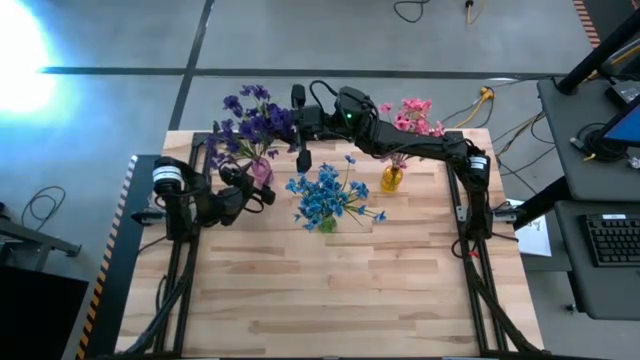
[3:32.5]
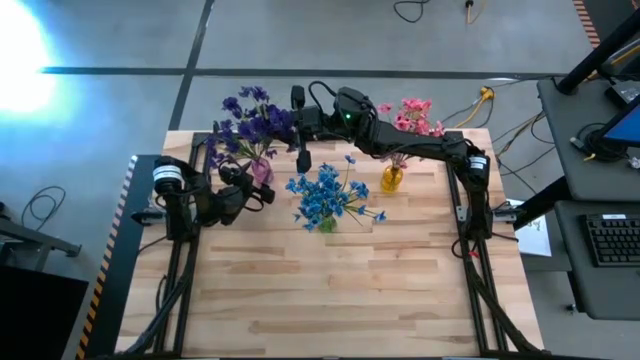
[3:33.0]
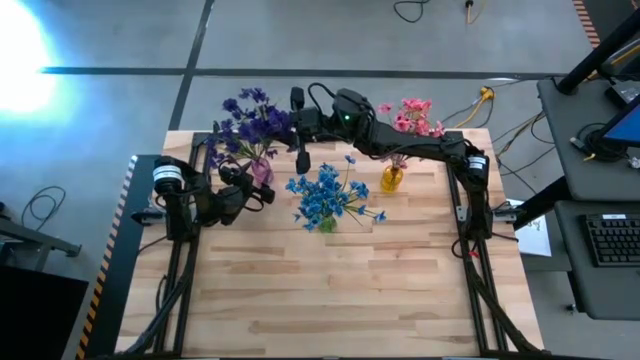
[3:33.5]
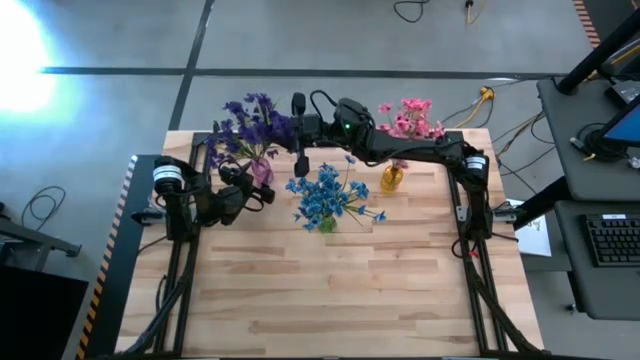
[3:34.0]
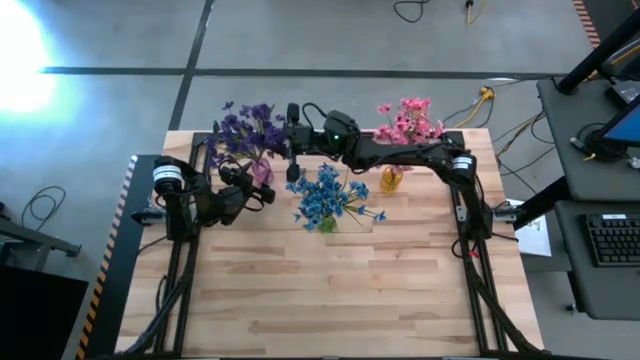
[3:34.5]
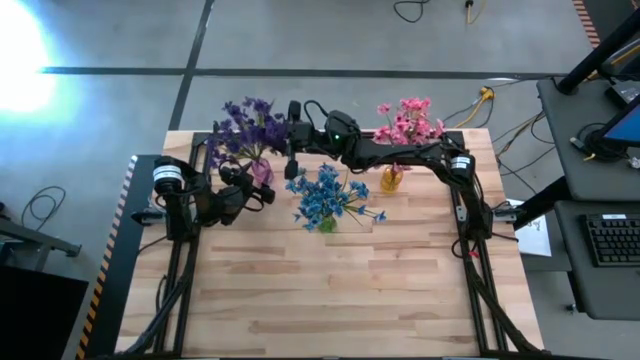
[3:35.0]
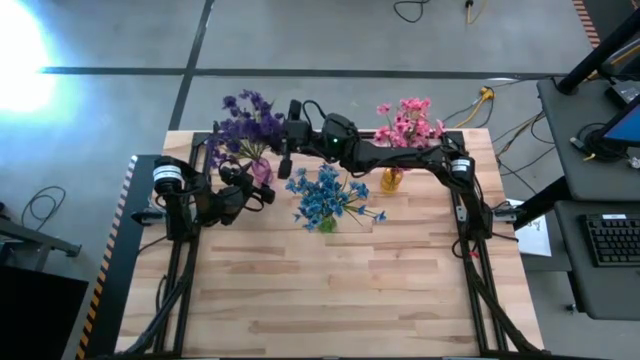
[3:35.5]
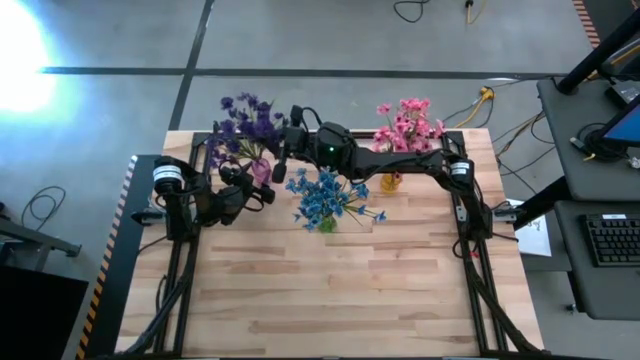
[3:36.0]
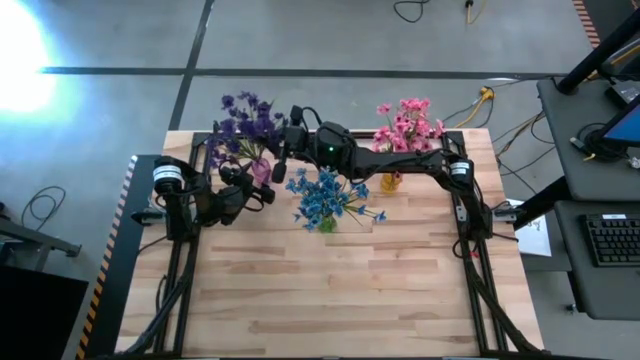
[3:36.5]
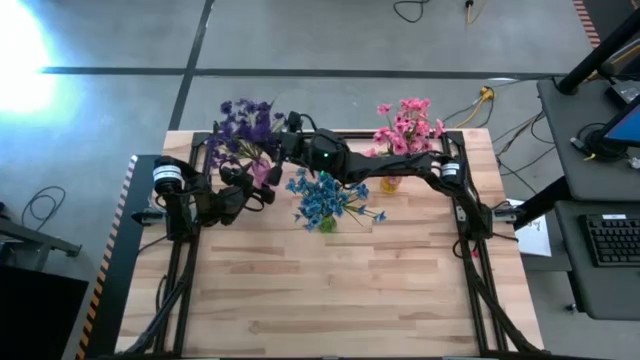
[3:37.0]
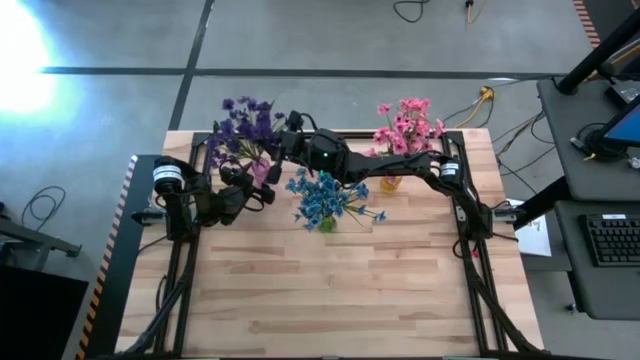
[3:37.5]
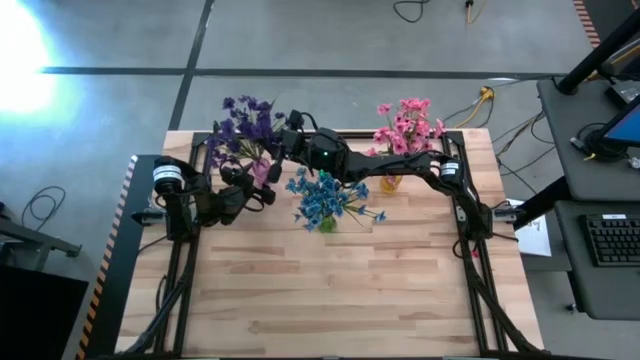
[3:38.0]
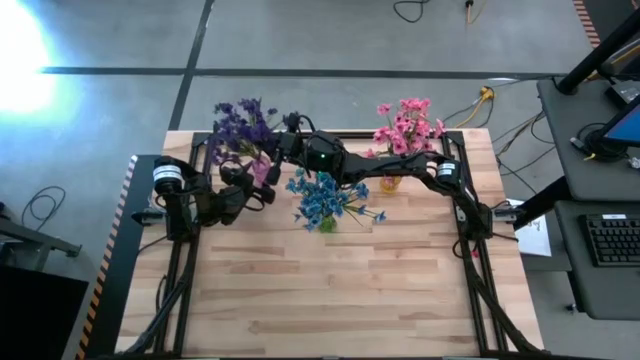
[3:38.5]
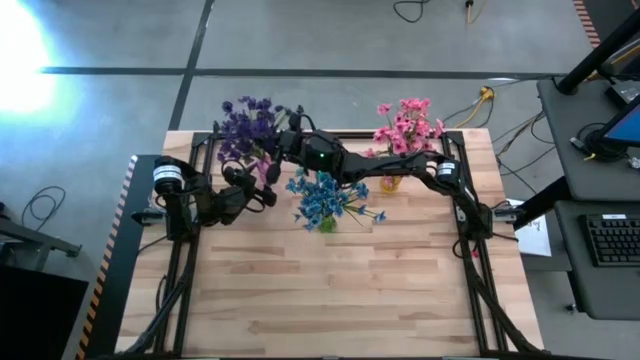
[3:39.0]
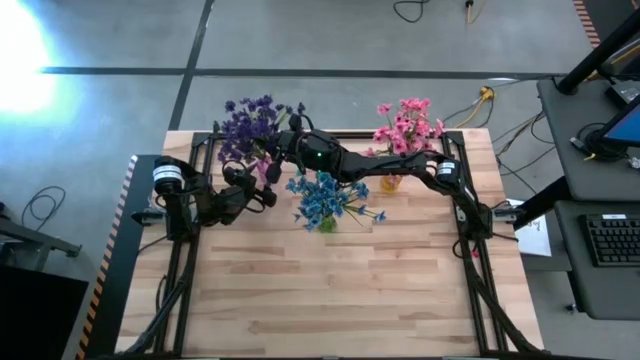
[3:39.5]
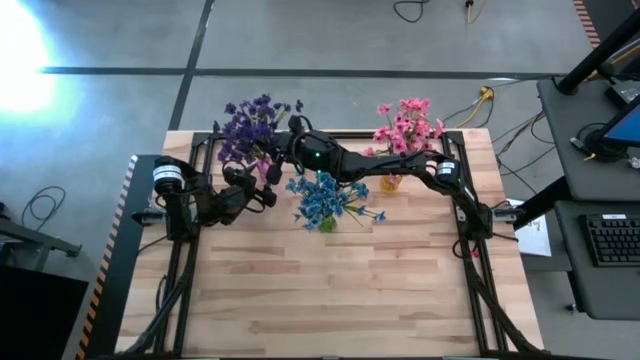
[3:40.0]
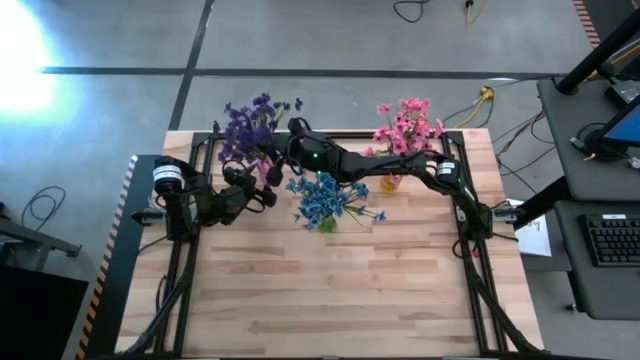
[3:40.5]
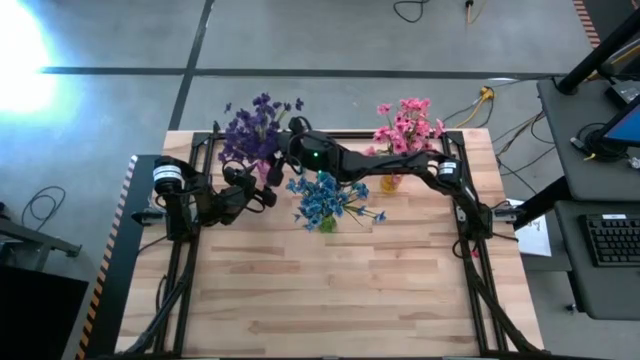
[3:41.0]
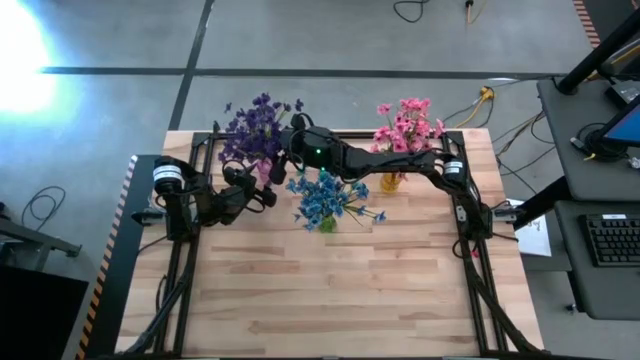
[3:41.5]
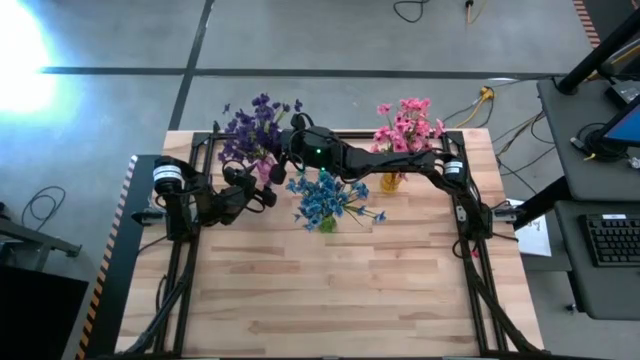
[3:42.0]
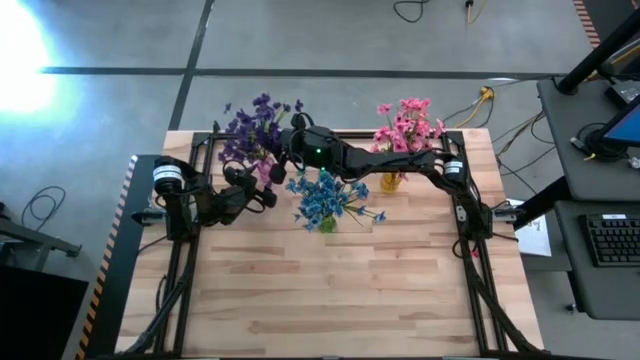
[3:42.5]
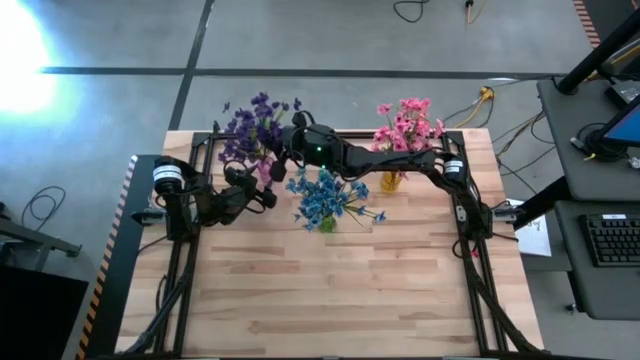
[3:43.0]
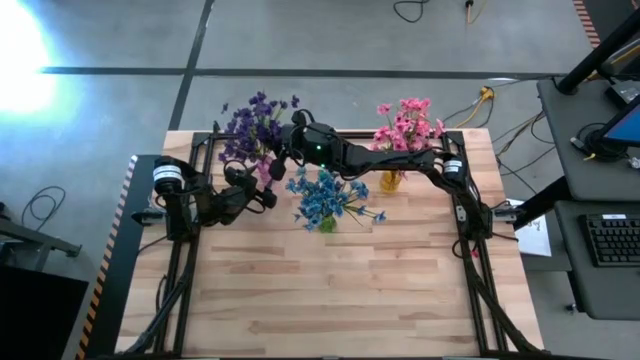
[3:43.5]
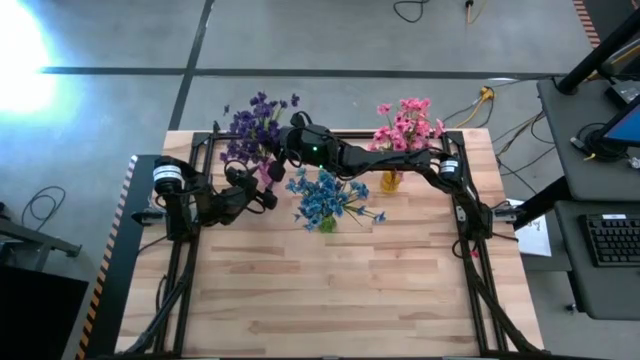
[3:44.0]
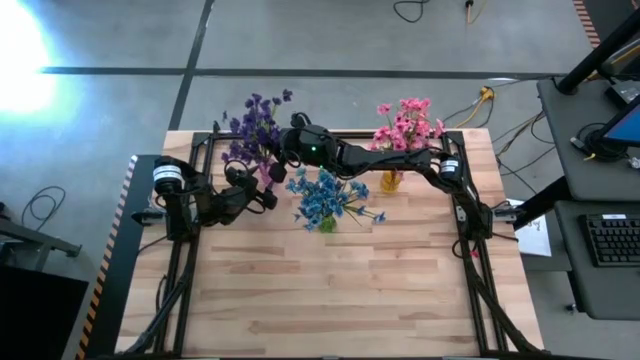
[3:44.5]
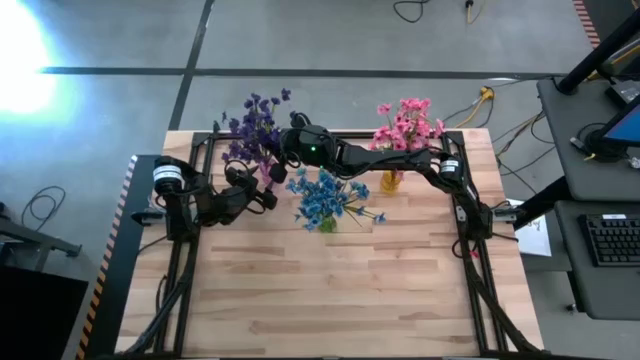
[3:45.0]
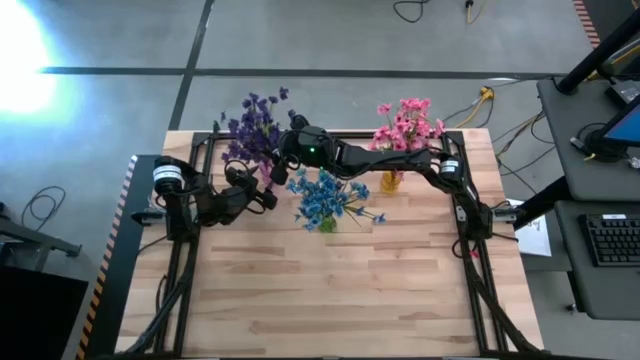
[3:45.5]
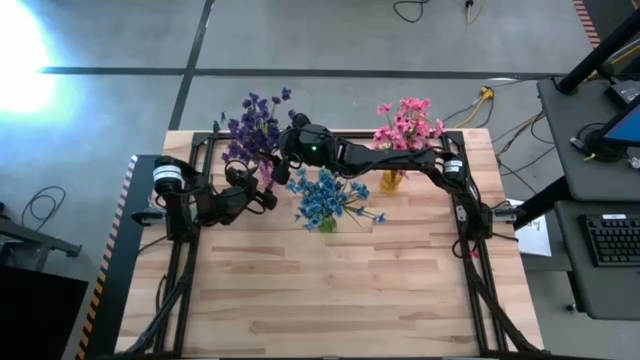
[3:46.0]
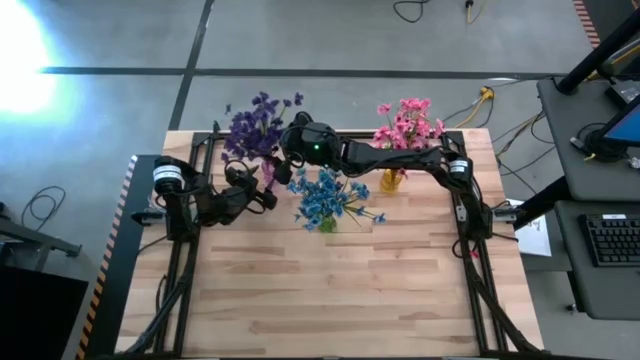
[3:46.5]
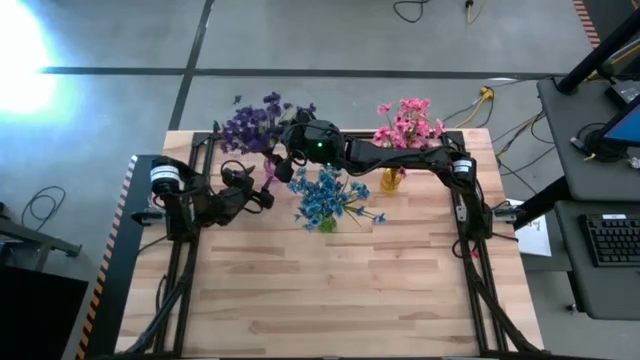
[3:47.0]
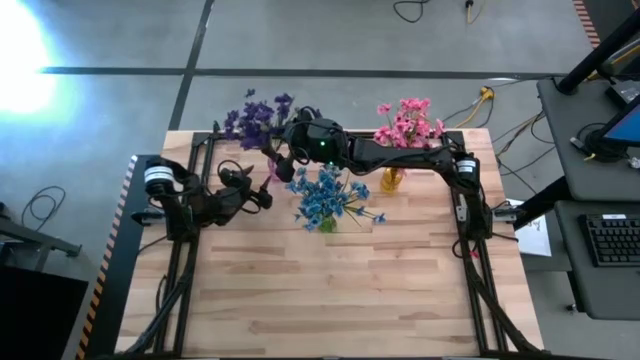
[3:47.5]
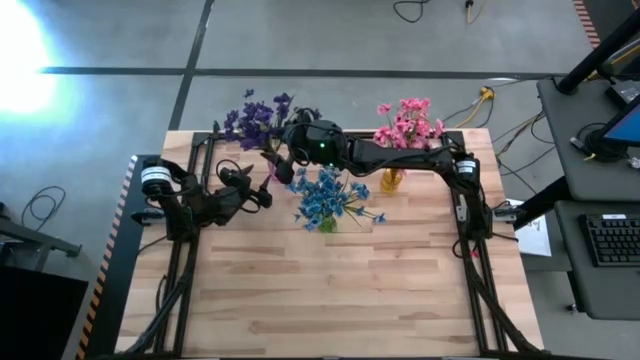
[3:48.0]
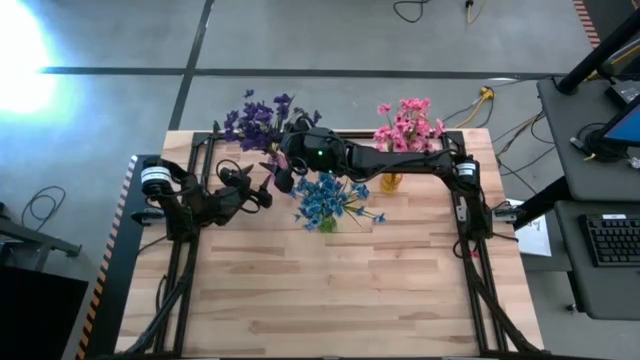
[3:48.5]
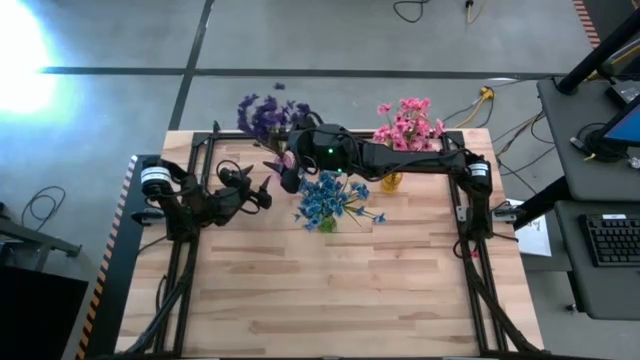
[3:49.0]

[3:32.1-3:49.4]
Task: Sort flowers into vase by color
Put the violet flowers into the violet vase
